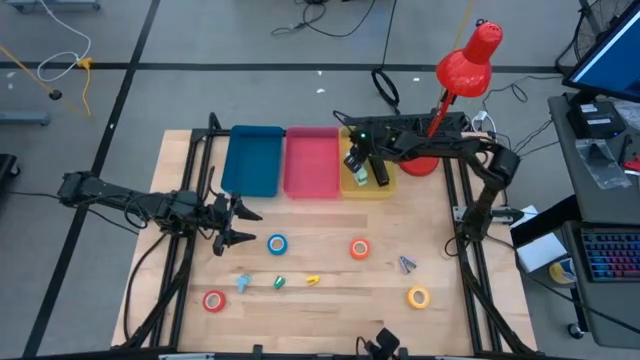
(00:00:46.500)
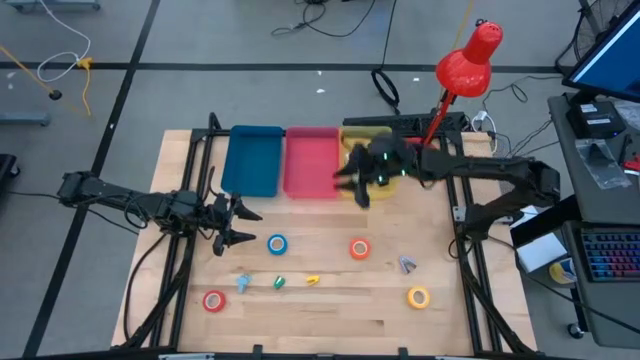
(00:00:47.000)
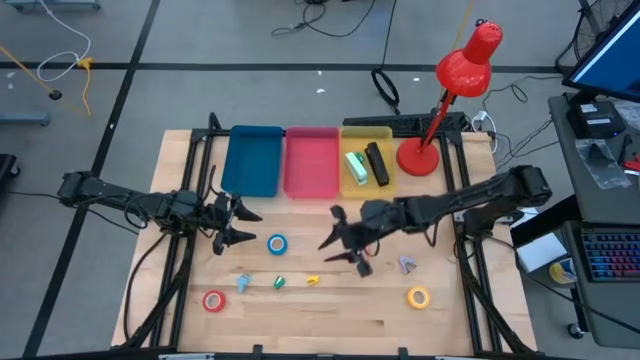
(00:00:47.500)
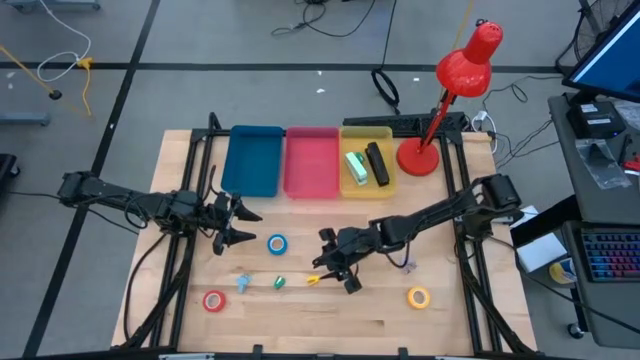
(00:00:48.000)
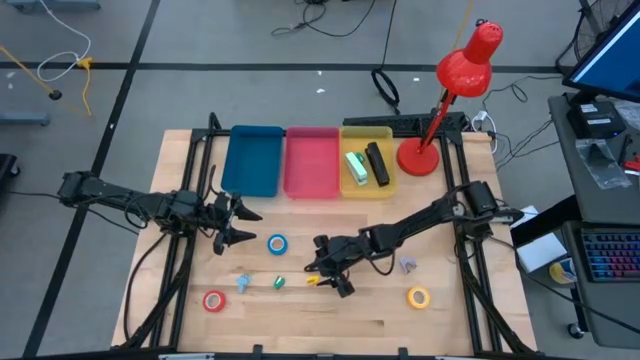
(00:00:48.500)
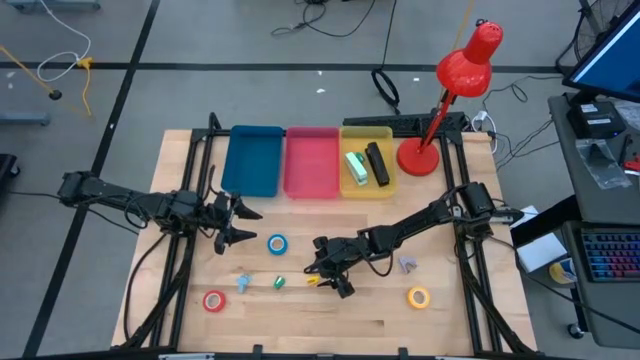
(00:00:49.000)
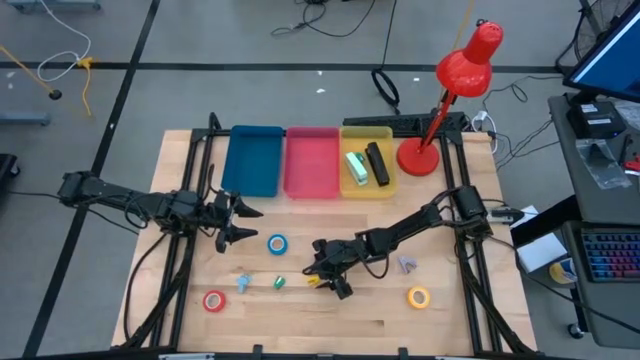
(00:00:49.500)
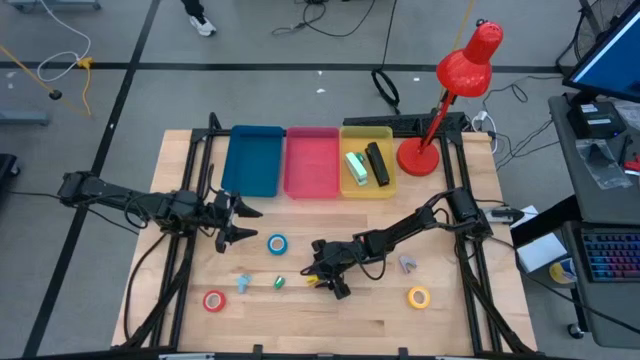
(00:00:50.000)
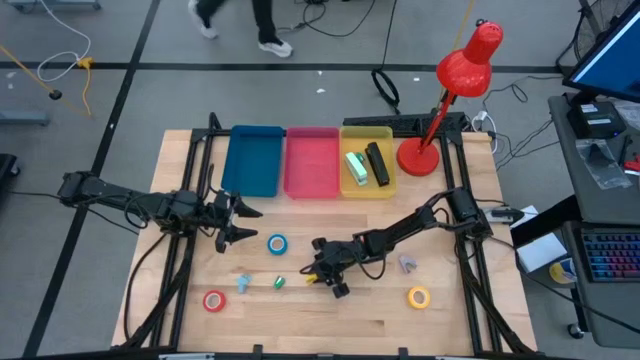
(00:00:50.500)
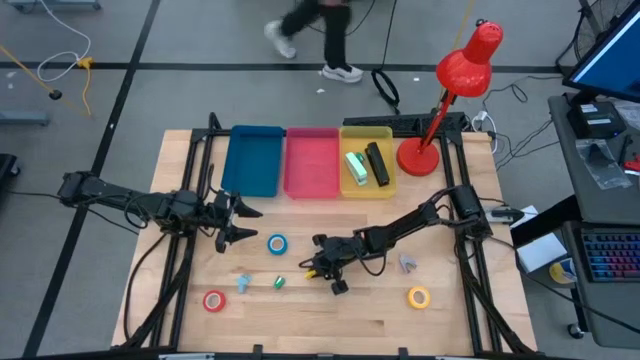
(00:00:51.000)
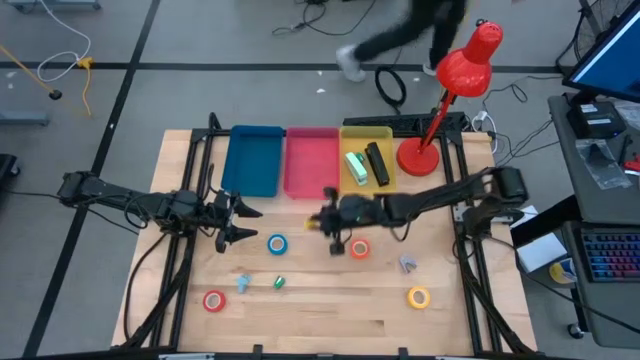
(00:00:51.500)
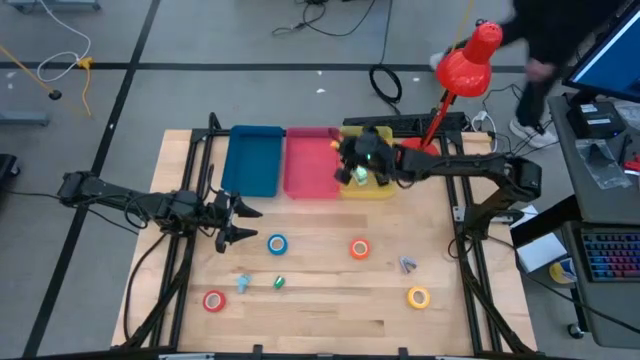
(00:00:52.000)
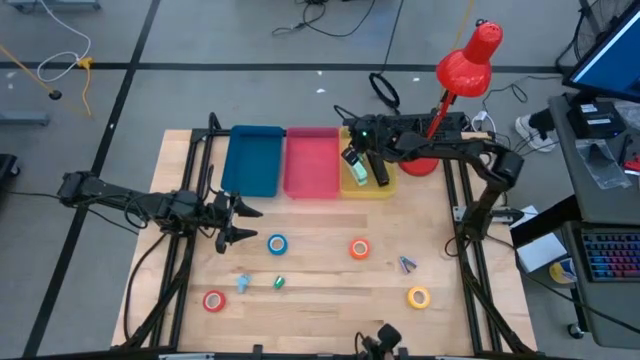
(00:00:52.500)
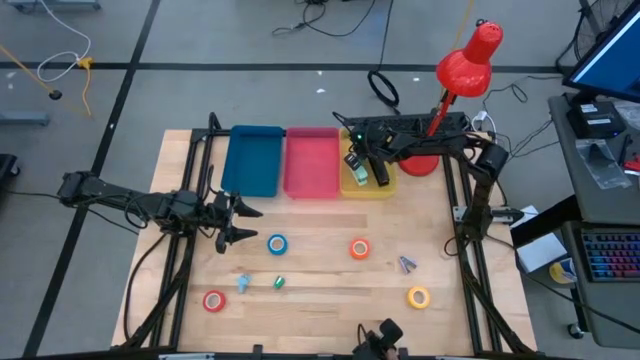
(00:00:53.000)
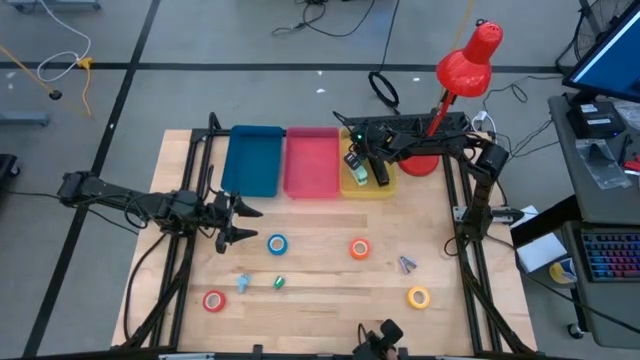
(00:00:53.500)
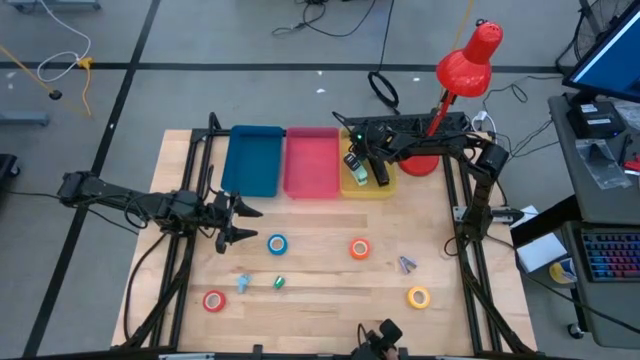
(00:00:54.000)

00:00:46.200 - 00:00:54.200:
Task: Pick and place Stapler, Stapler remover, tape
Put the yellow stapler into the yellow bin

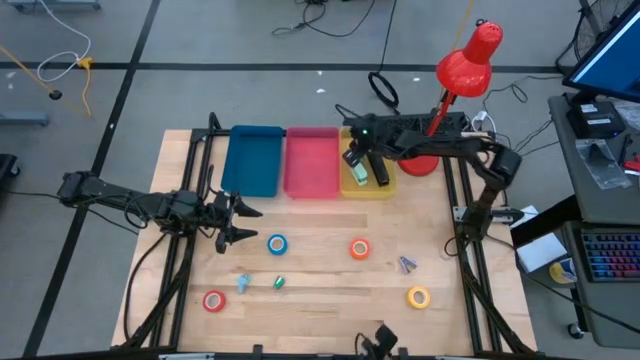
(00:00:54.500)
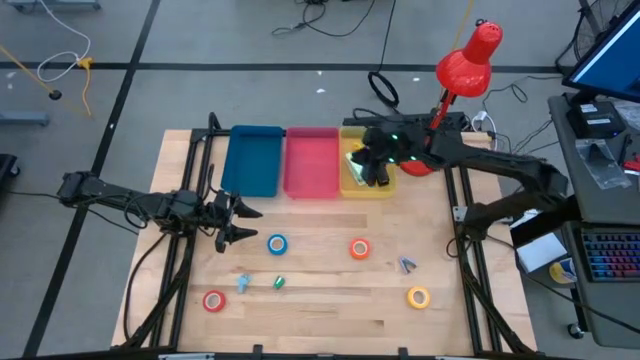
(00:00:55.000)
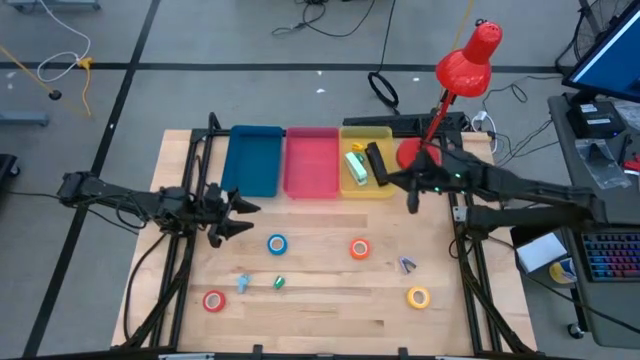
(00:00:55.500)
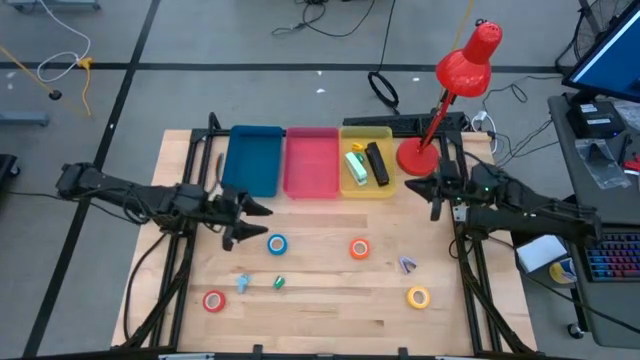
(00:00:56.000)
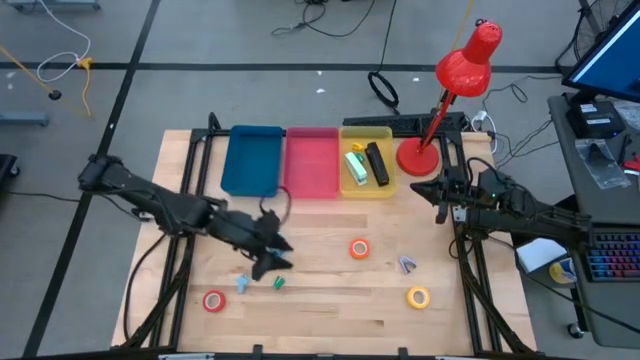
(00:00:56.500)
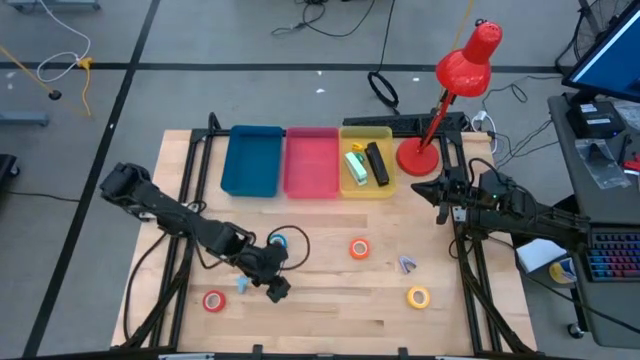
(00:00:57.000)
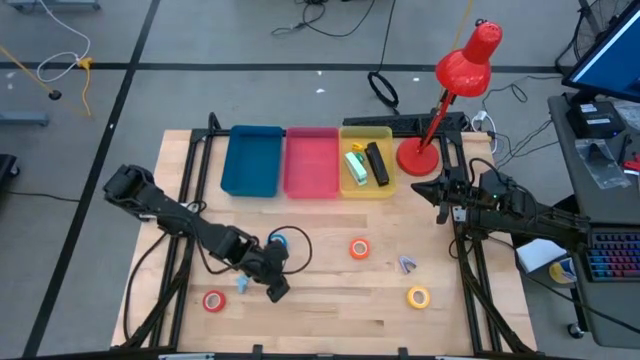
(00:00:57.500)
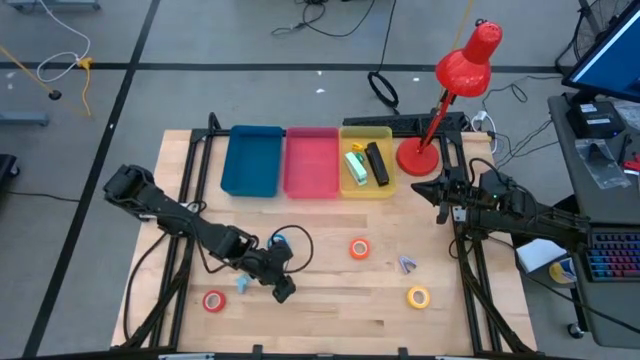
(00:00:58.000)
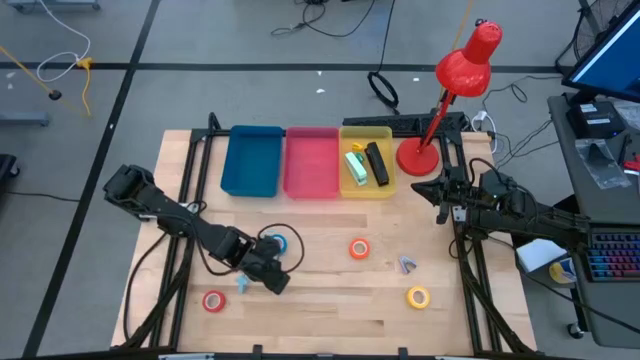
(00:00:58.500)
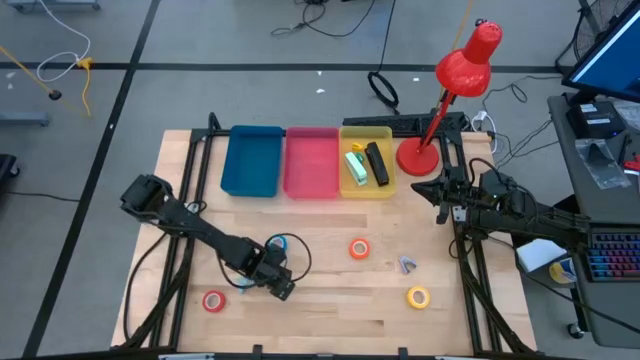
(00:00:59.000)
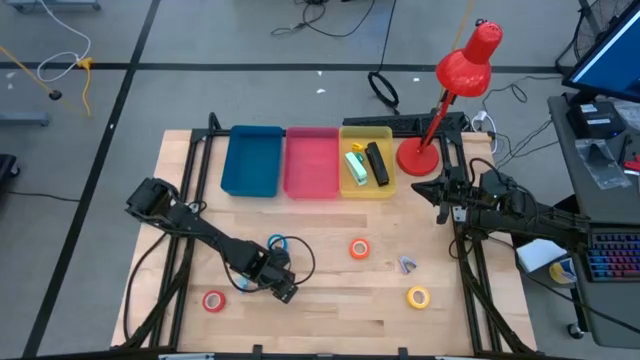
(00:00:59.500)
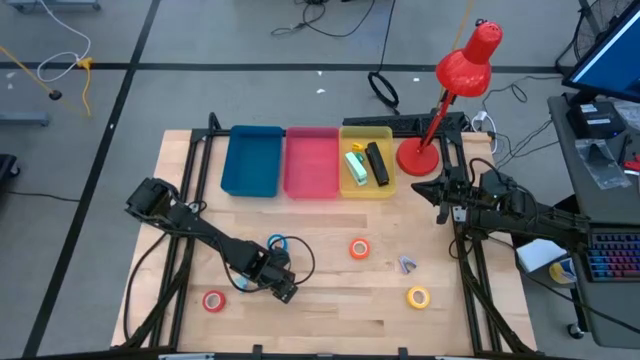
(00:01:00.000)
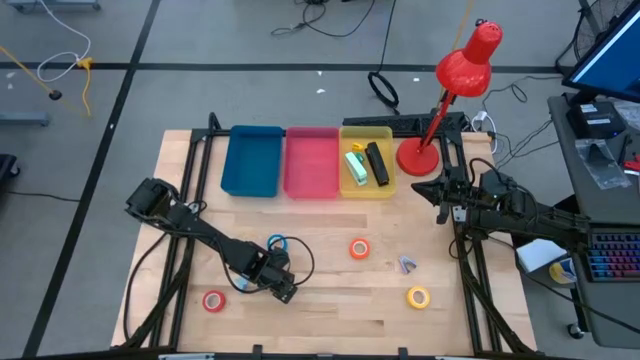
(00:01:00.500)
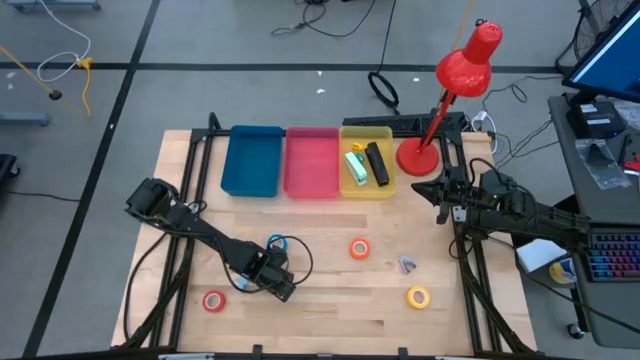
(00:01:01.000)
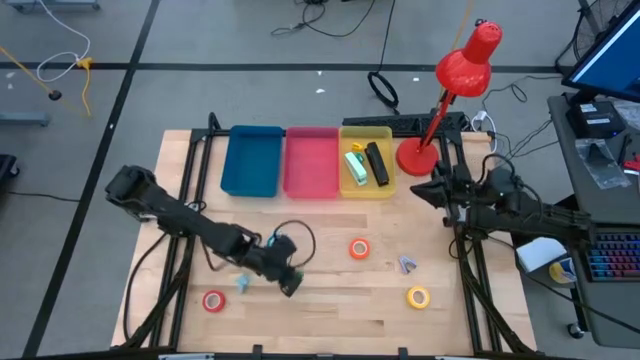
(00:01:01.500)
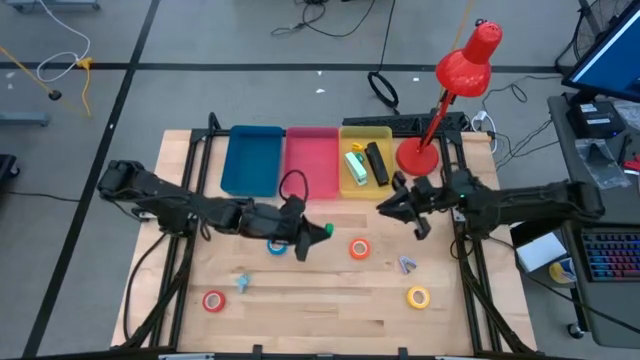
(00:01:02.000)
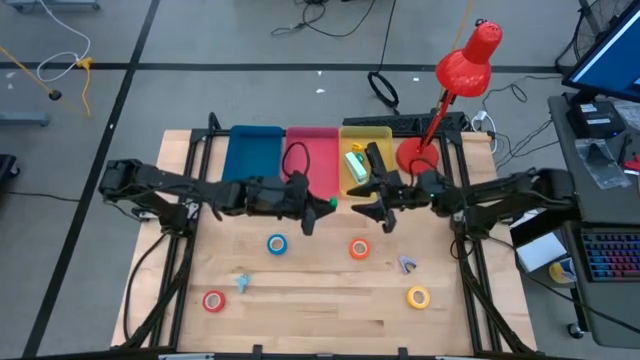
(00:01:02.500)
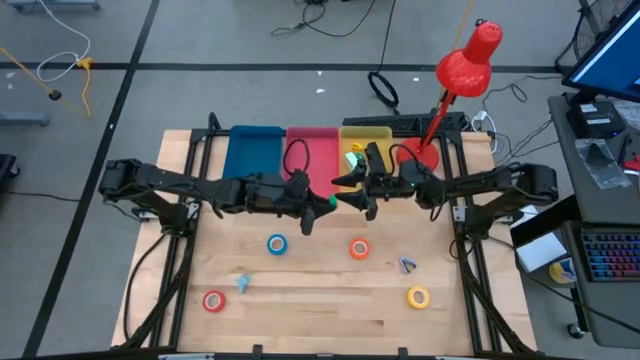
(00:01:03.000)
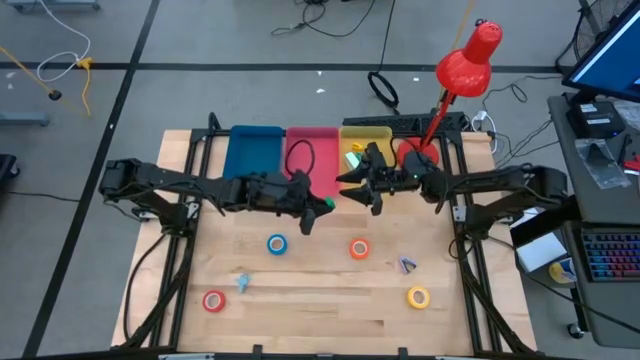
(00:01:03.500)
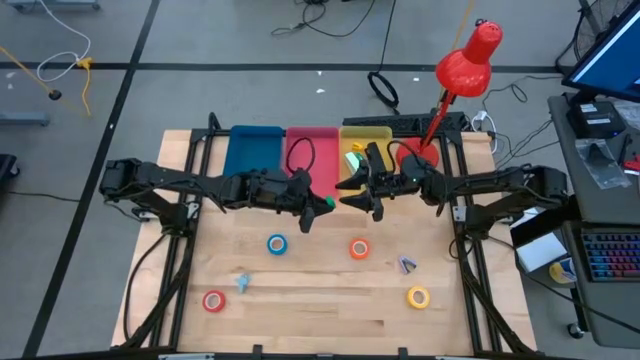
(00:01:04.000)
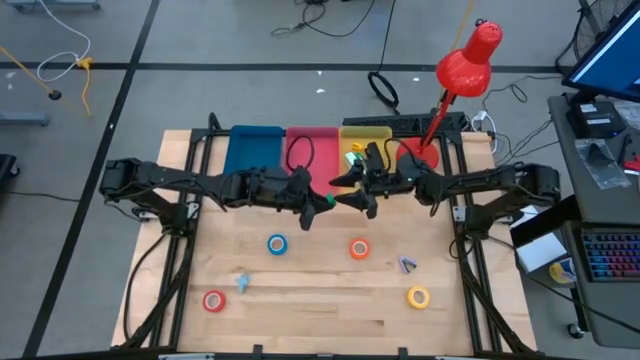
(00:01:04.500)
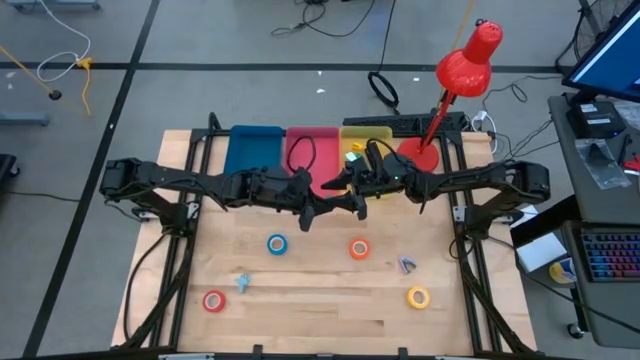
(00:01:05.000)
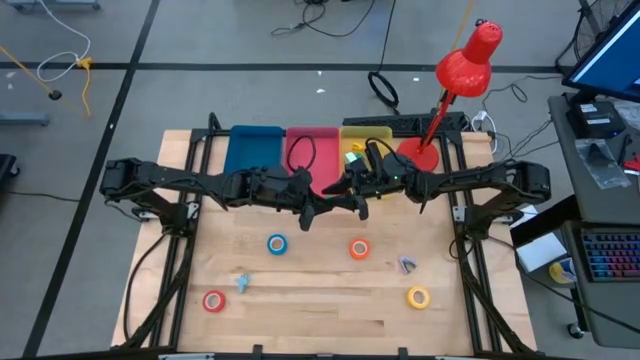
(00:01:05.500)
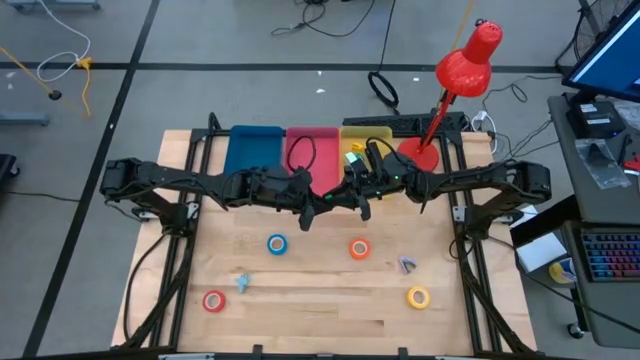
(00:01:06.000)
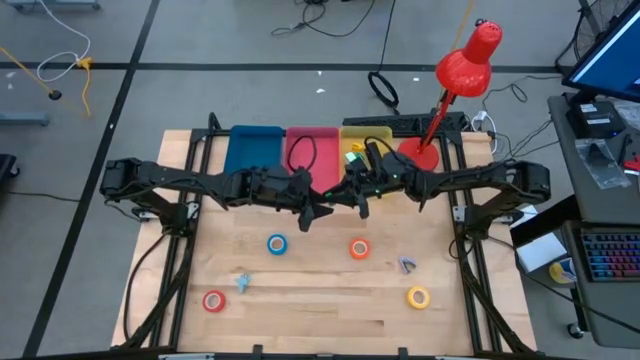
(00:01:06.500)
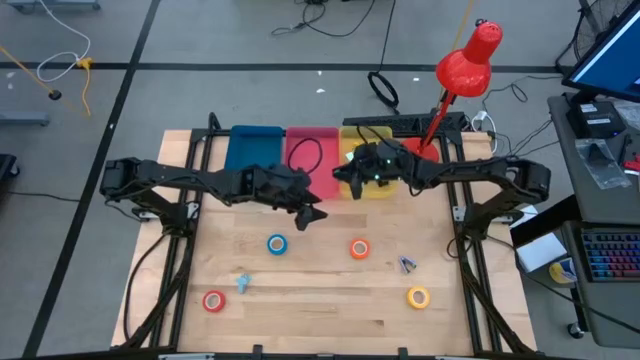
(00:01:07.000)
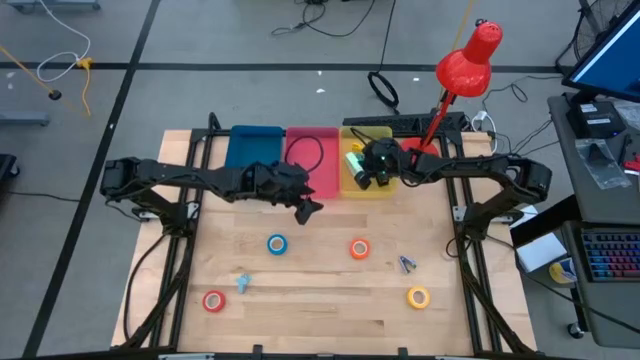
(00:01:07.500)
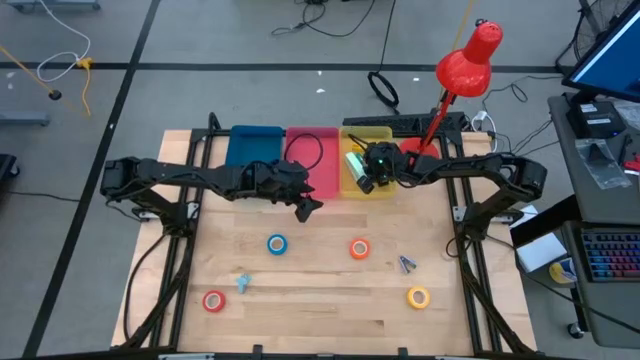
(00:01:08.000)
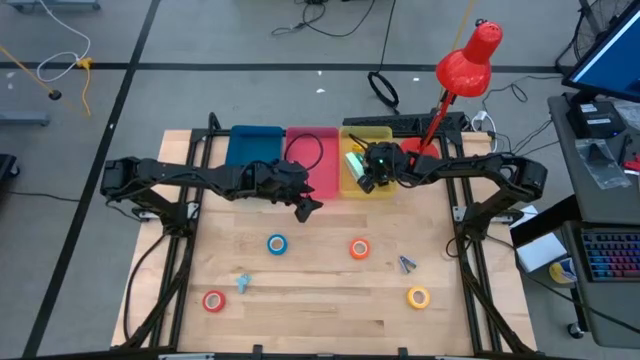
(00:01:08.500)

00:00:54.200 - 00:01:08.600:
Put the green stapler into the yellow bin
